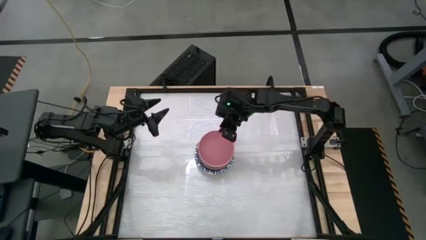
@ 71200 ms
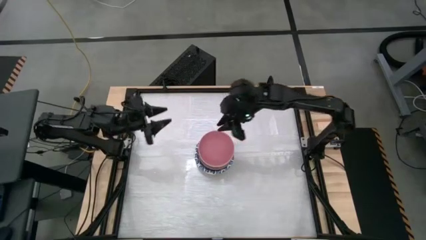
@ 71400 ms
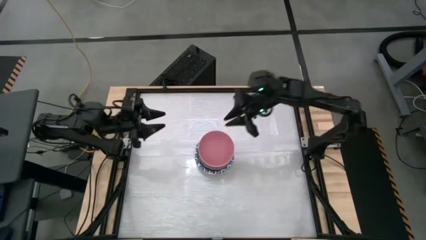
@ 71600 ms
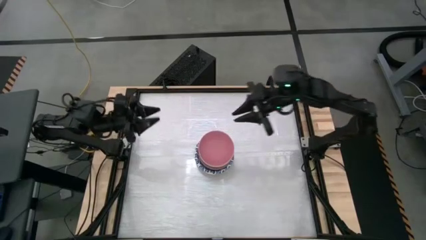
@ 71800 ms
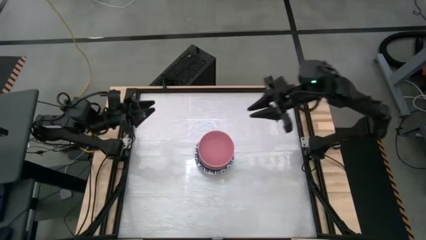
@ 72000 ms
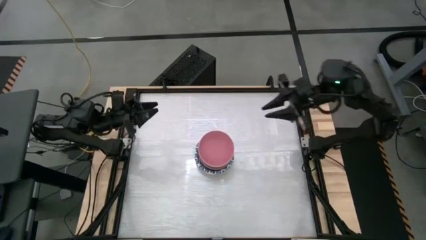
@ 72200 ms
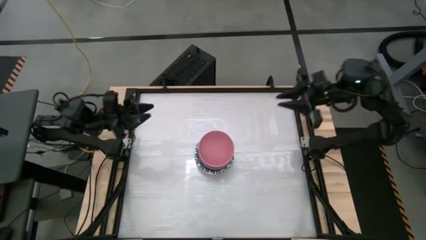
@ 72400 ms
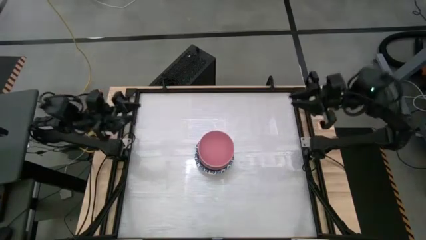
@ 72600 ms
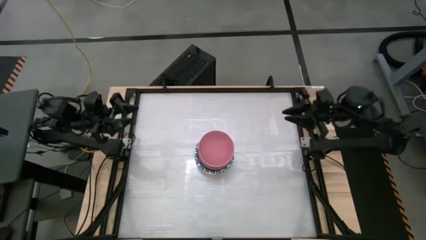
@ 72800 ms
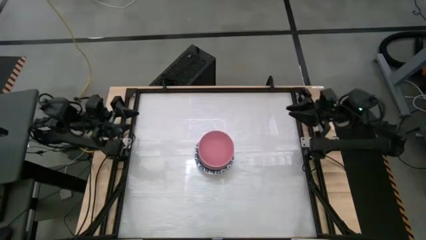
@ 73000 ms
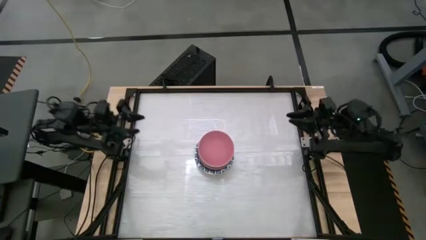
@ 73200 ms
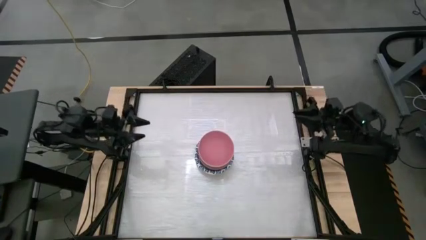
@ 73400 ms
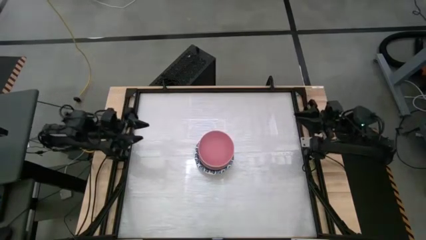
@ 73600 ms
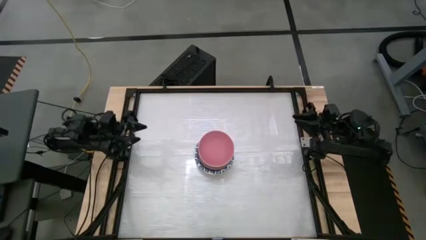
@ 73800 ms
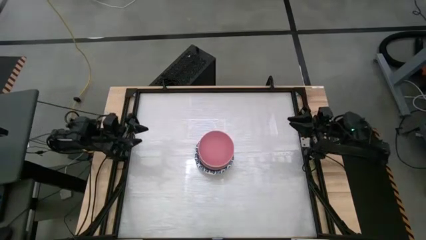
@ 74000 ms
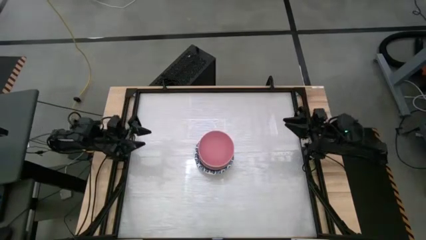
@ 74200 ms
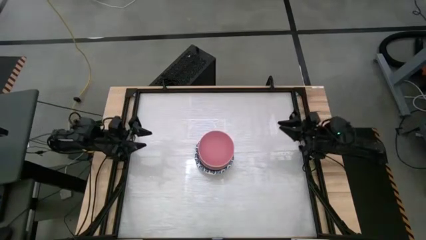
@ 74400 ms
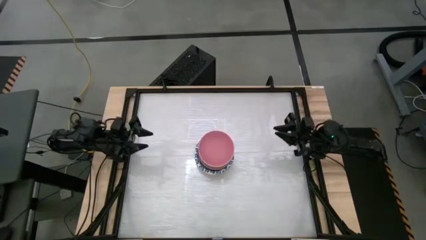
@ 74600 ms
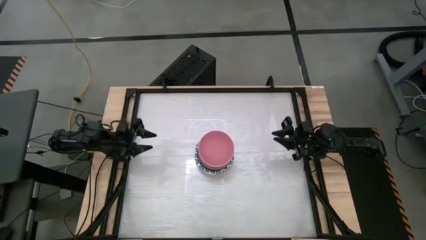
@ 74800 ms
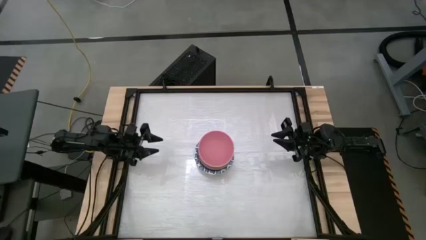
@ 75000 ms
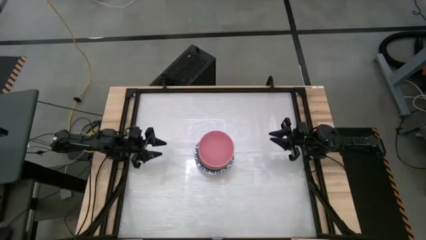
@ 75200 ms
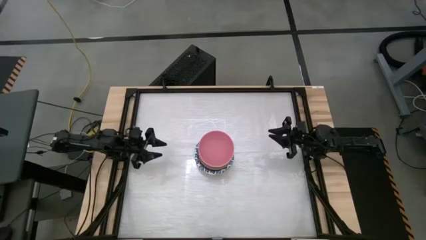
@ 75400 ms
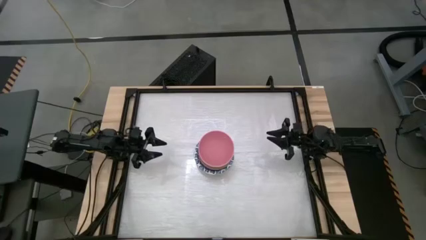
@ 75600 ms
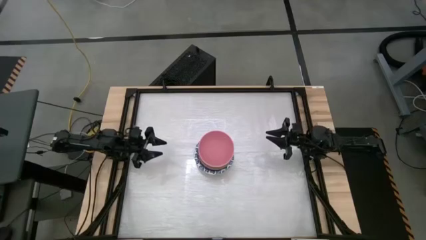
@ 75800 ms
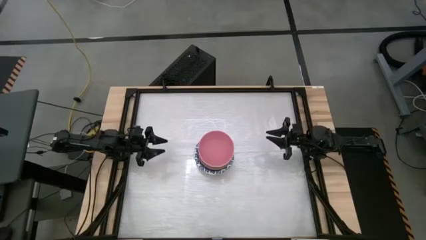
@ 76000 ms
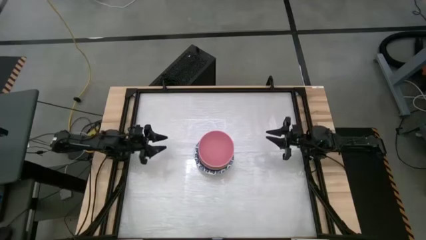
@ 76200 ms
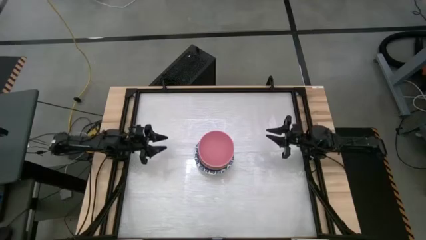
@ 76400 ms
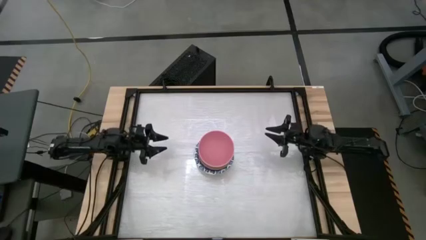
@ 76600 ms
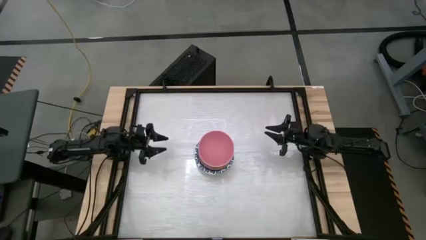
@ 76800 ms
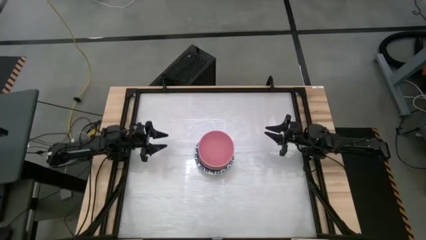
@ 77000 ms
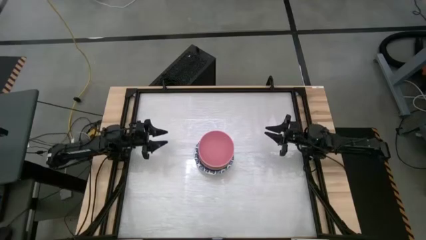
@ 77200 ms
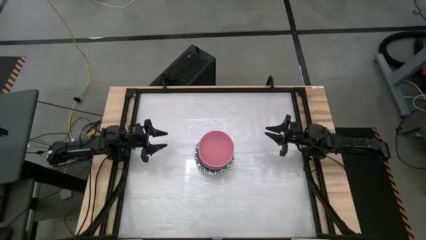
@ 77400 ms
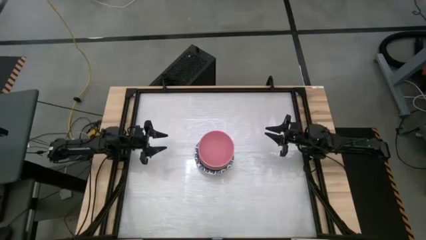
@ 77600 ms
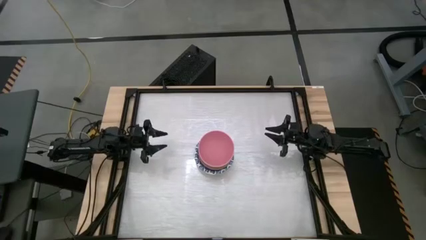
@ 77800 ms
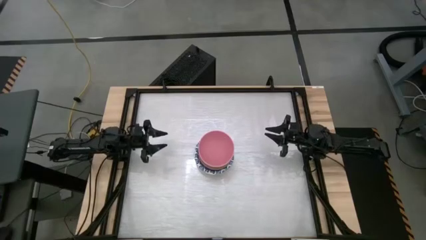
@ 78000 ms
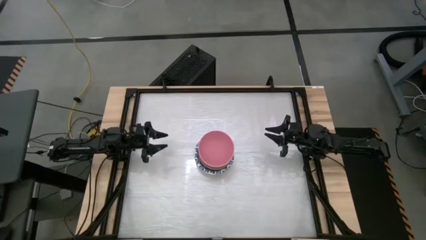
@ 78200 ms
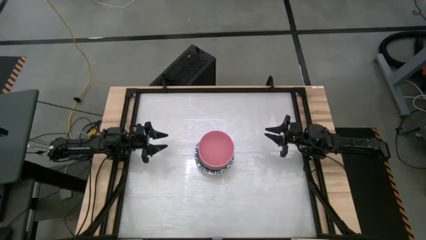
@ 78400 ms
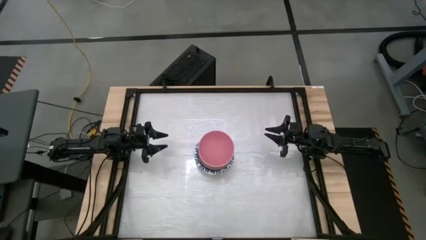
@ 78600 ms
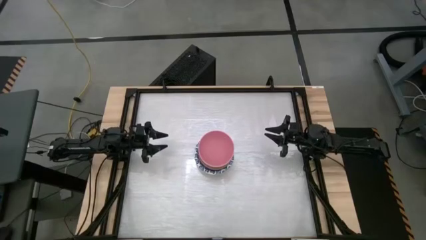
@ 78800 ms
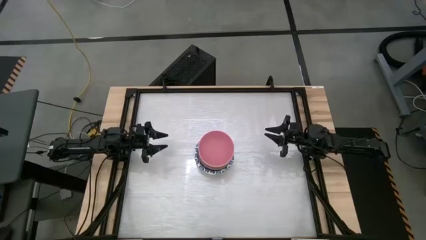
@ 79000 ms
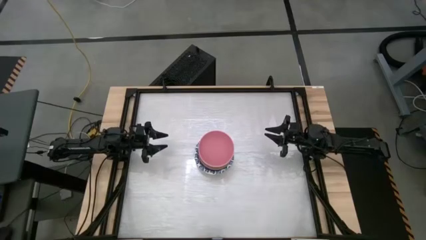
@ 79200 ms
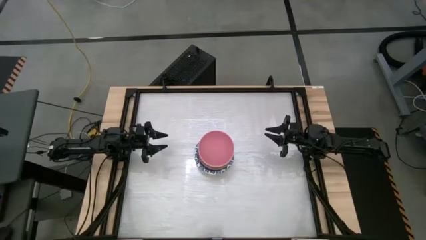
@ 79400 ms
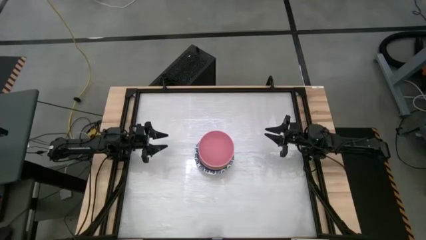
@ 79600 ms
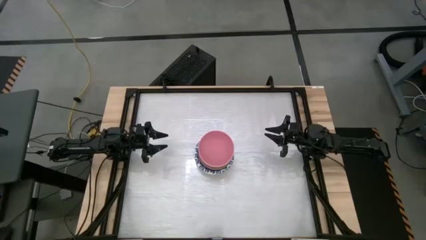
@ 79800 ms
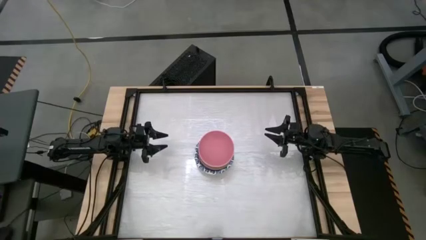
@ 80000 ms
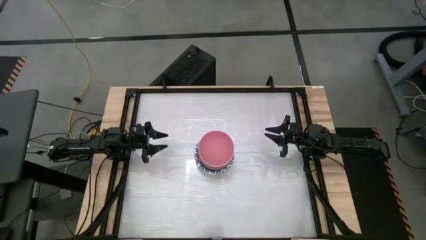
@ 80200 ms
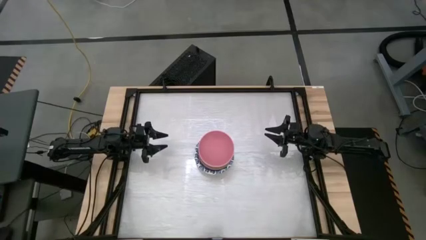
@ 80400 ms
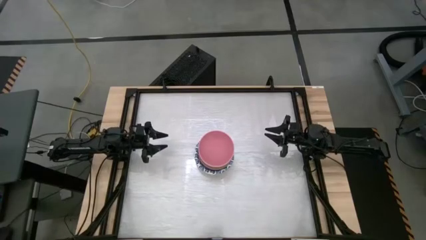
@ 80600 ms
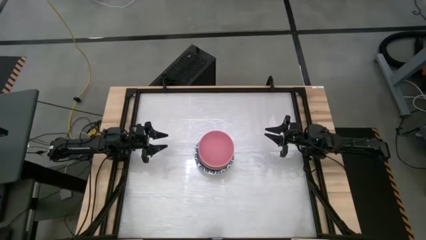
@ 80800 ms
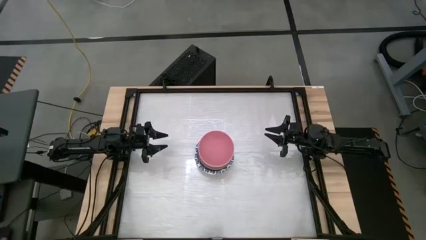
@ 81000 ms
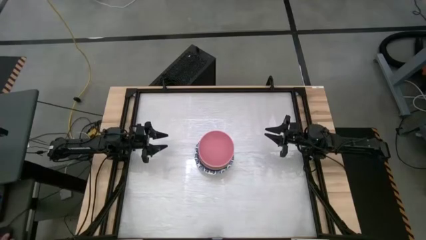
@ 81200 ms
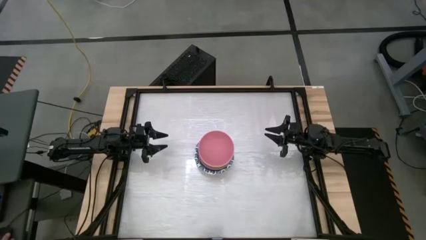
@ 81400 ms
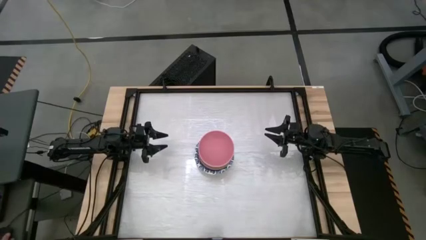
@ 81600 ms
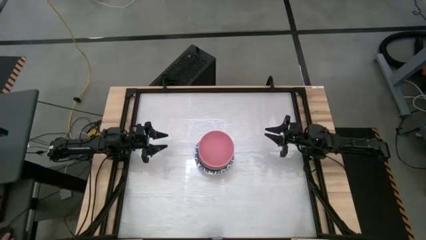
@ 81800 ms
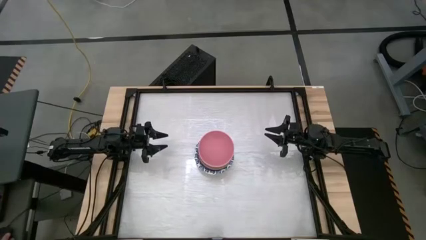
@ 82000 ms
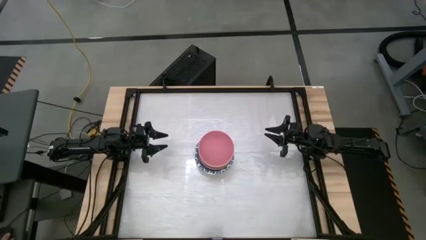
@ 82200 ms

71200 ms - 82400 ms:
Return to Home Position
